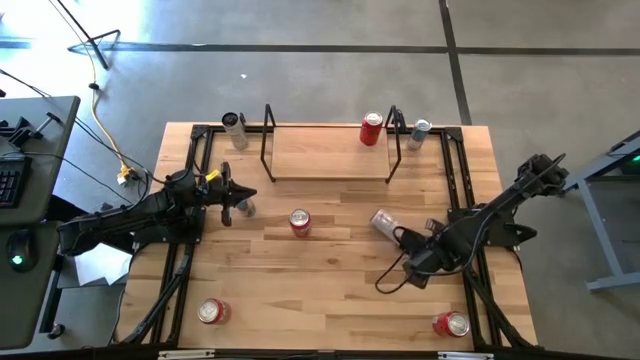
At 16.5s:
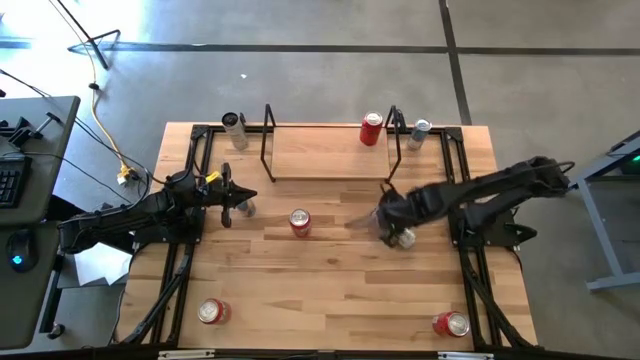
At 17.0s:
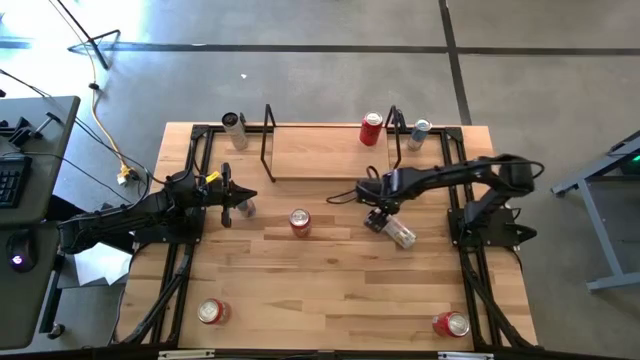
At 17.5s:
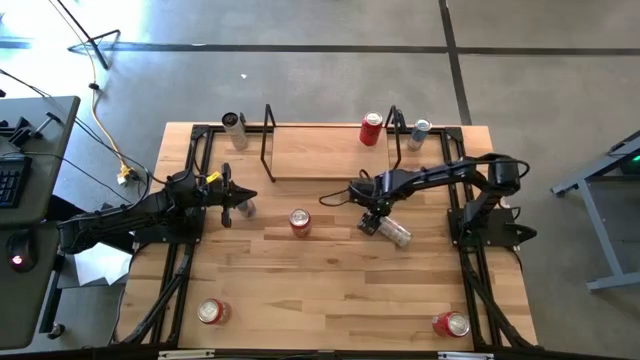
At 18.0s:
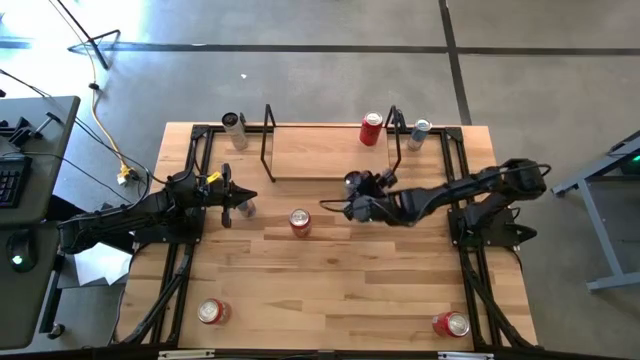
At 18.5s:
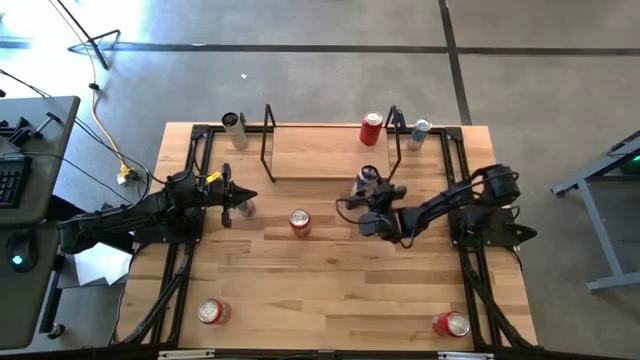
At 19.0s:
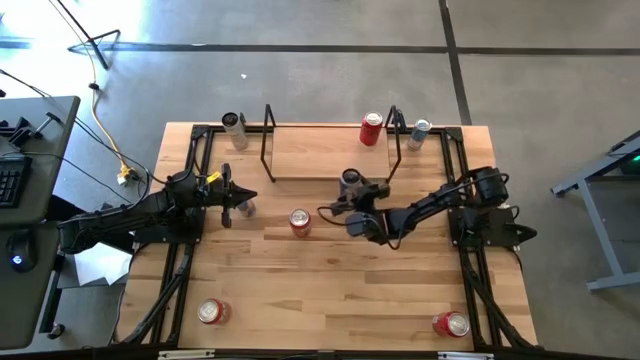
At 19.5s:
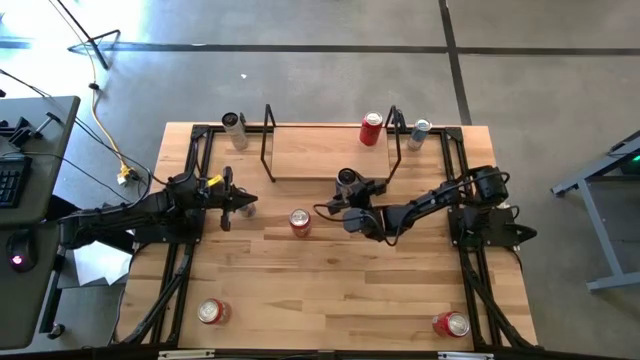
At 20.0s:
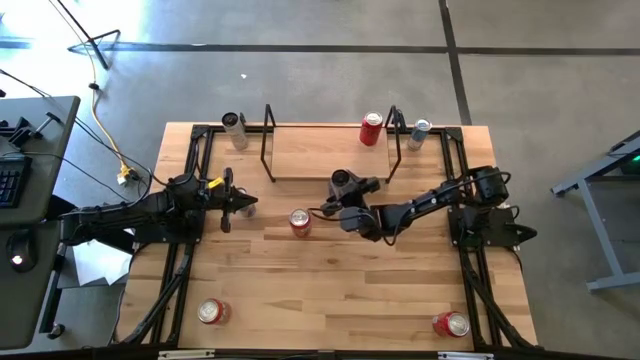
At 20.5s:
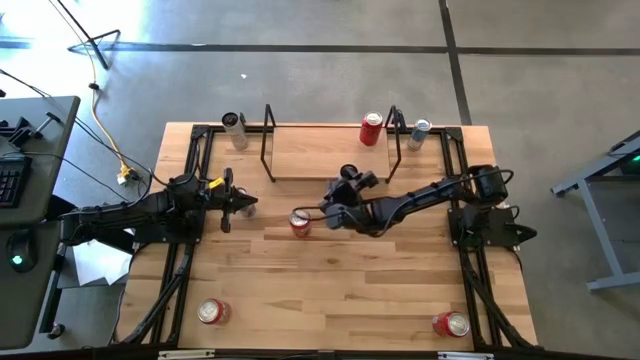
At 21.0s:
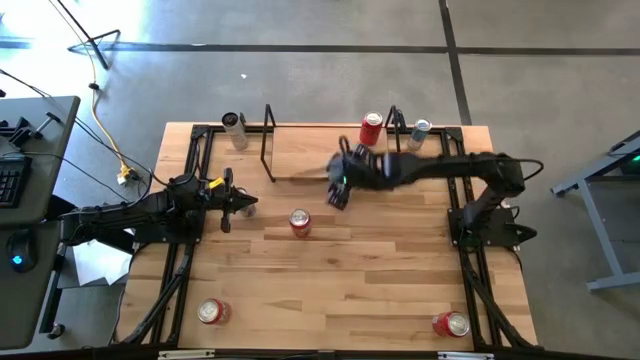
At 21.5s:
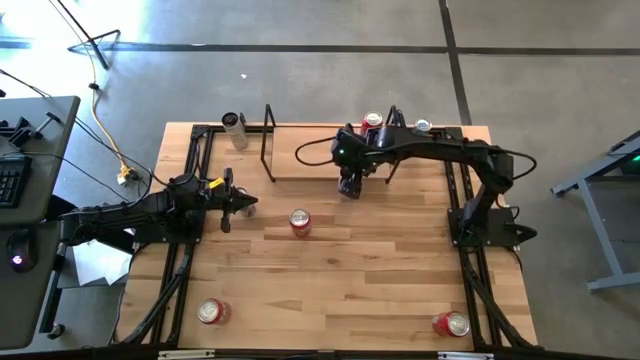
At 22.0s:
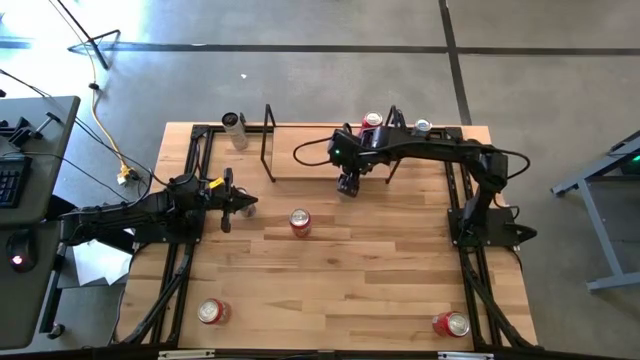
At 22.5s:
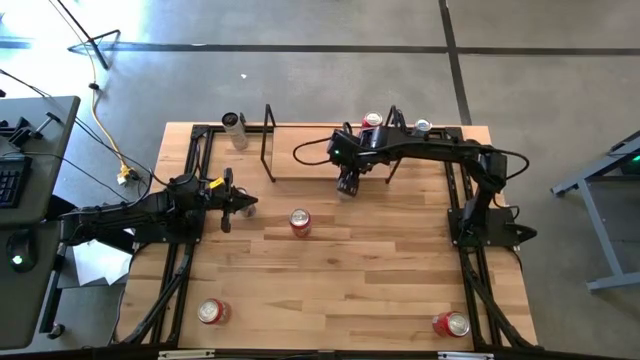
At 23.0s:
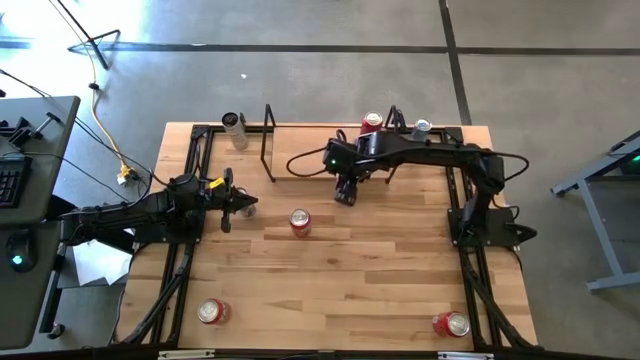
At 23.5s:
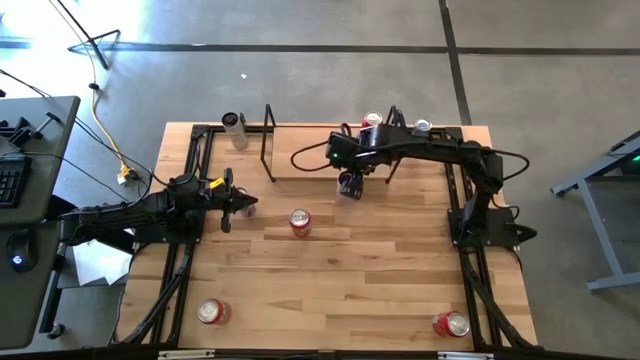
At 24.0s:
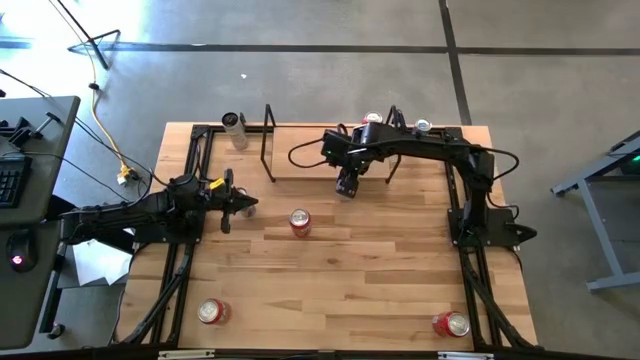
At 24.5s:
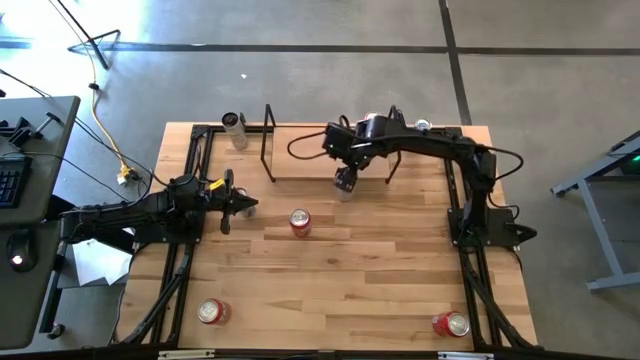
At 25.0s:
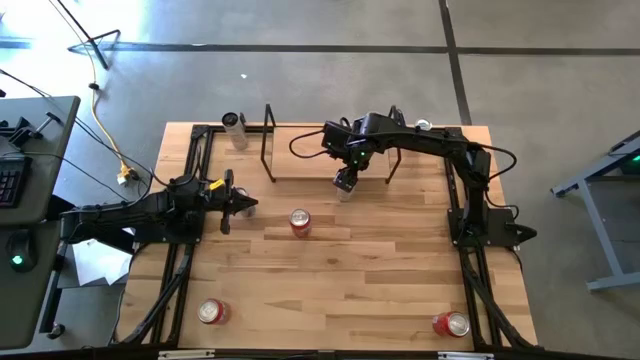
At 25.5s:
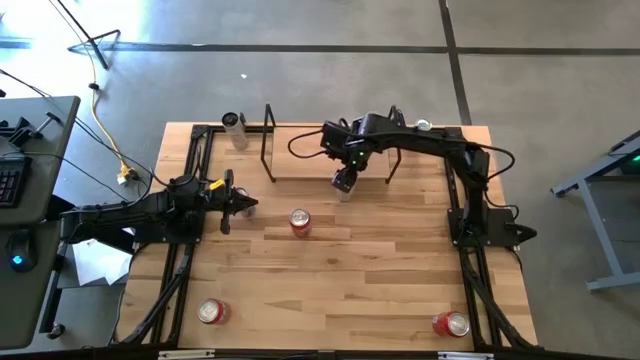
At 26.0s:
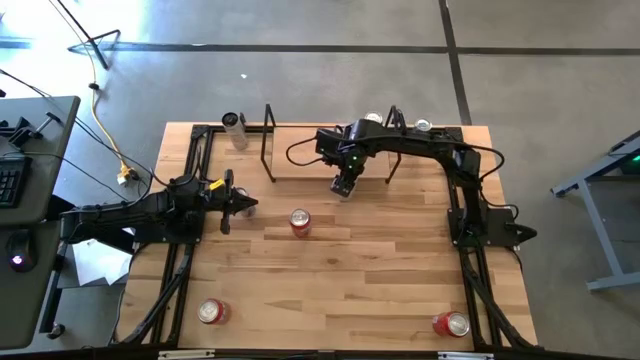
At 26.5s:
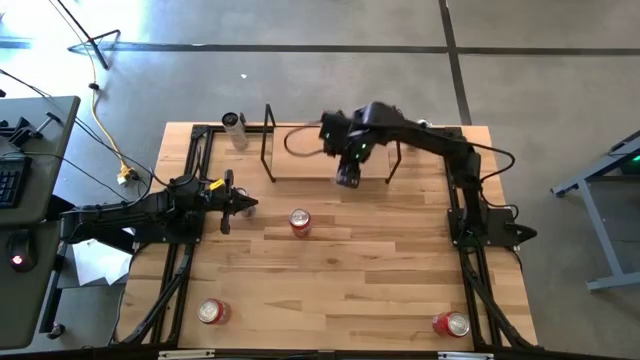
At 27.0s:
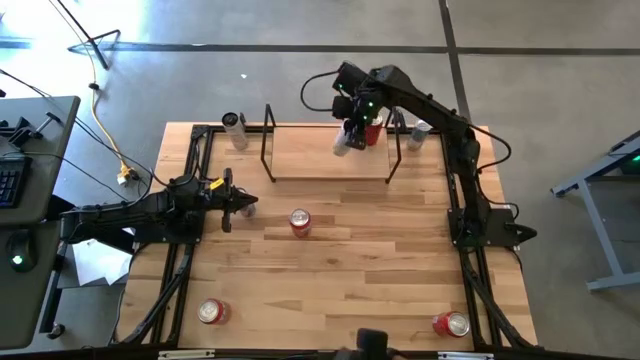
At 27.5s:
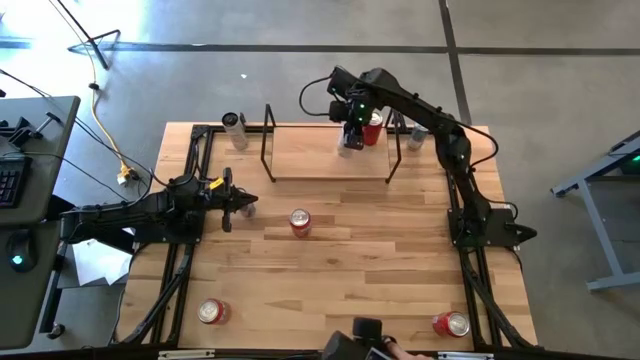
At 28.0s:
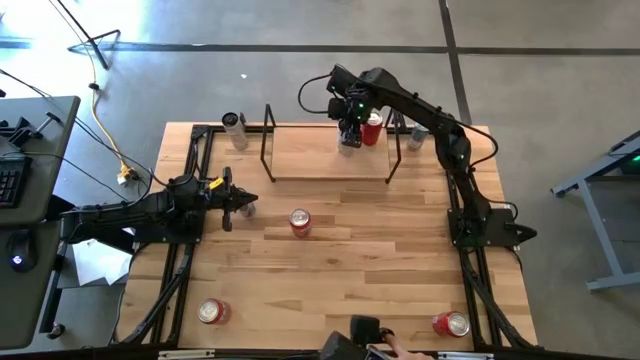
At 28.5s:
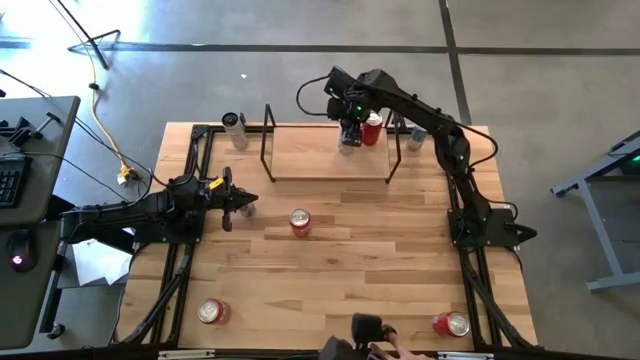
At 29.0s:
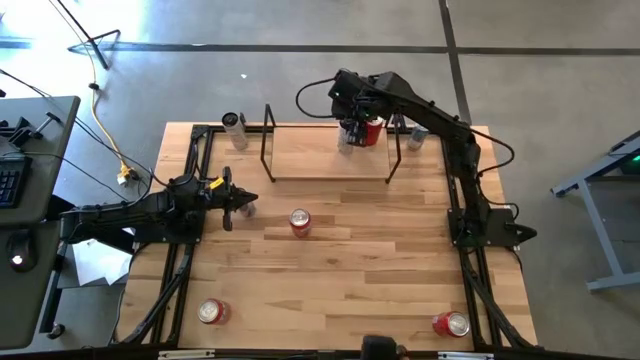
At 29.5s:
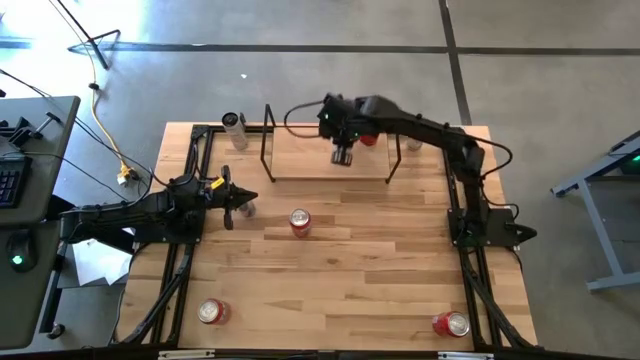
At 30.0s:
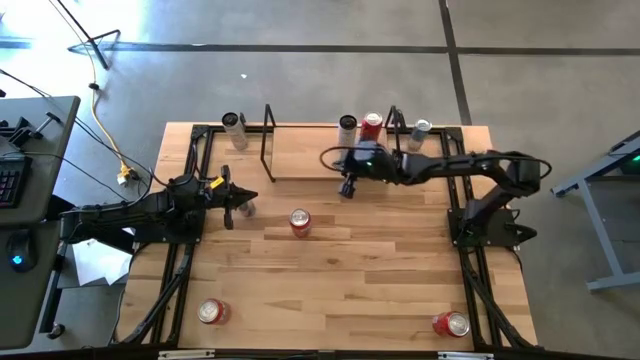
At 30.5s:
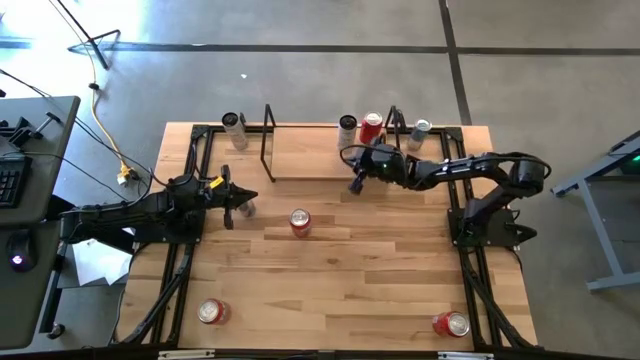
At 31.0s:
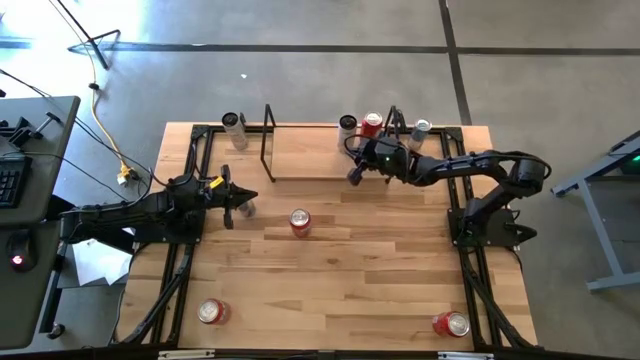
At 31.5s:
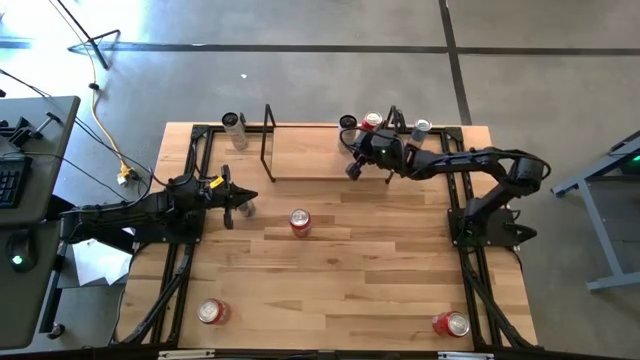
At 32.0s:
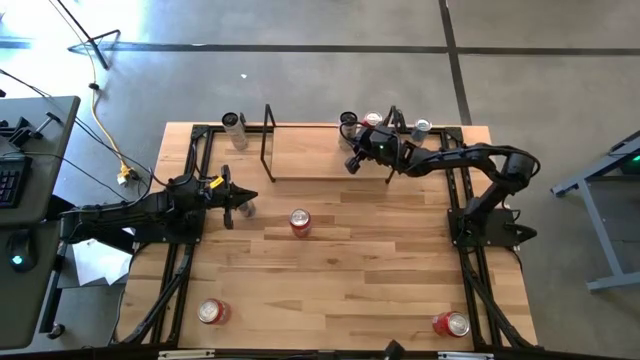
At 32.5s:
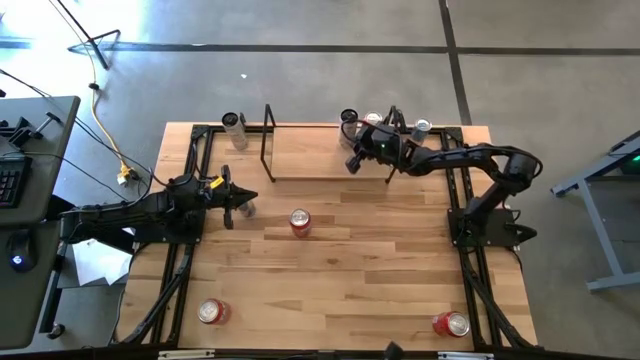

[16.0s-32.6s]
Task: Place canned beverage on shelf
Put the bottom white-yellow soda can on the shelf

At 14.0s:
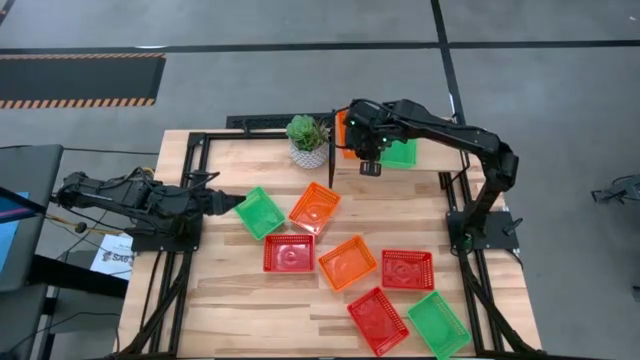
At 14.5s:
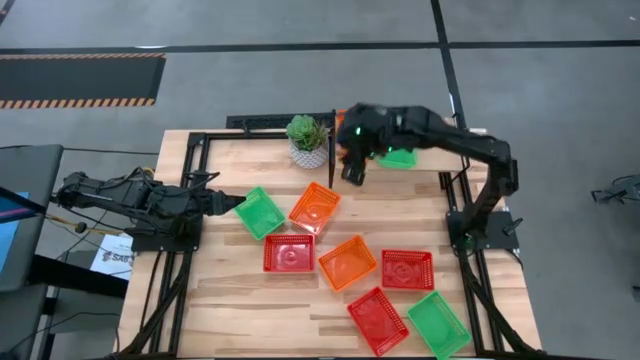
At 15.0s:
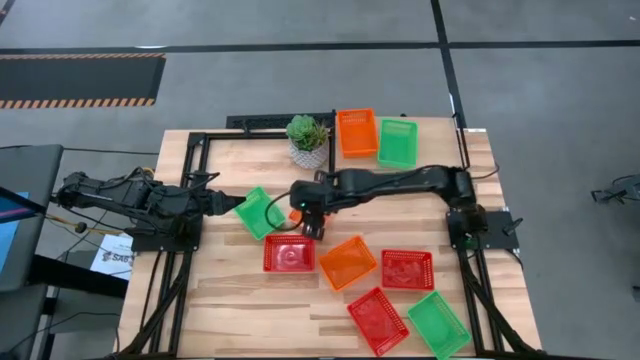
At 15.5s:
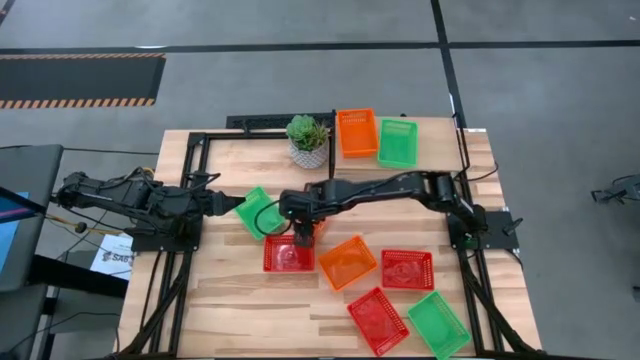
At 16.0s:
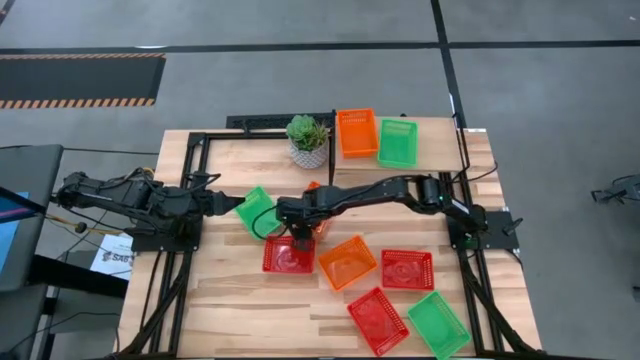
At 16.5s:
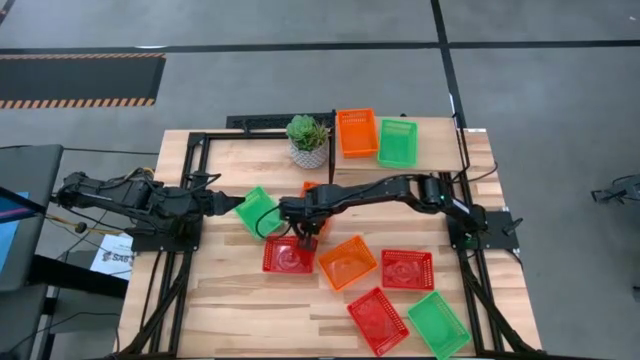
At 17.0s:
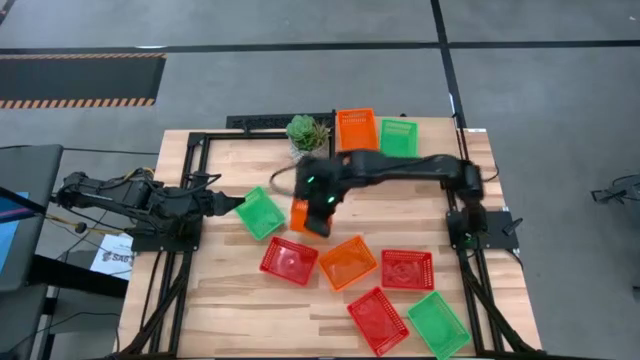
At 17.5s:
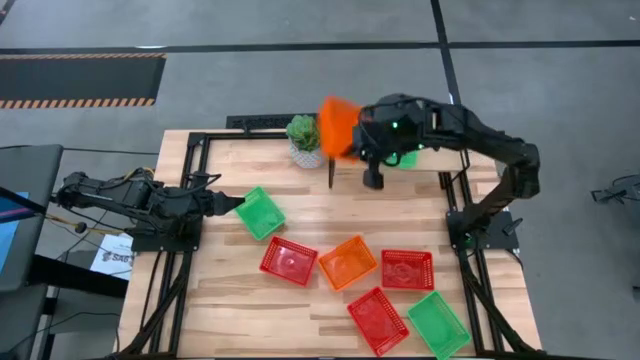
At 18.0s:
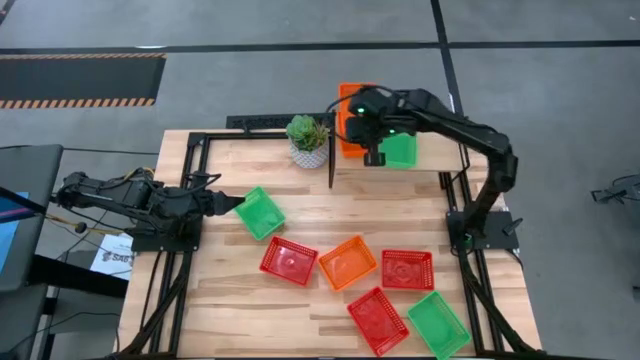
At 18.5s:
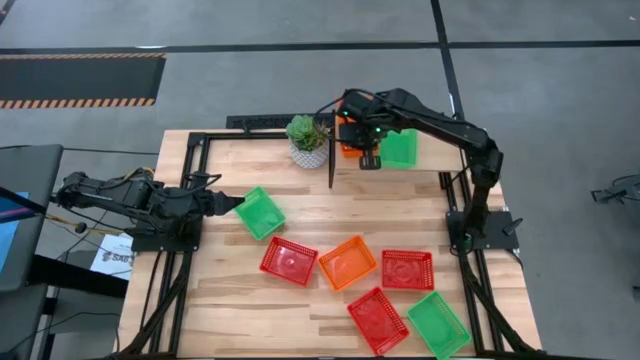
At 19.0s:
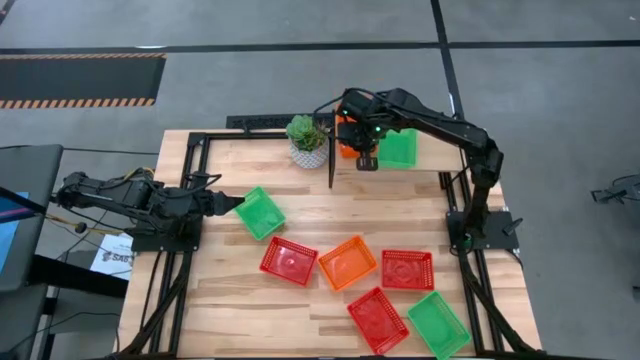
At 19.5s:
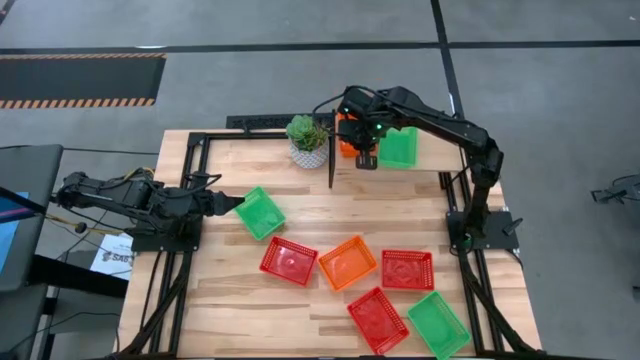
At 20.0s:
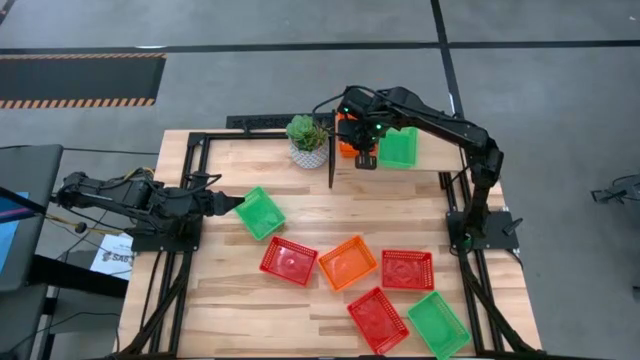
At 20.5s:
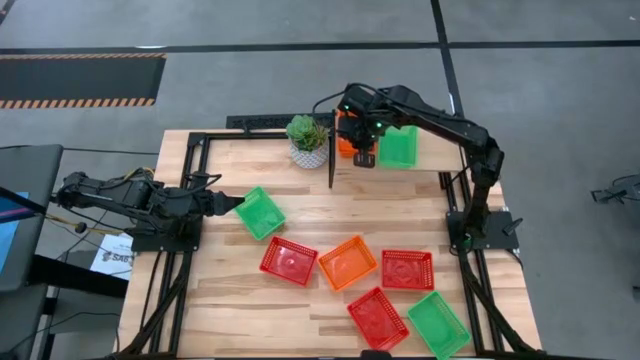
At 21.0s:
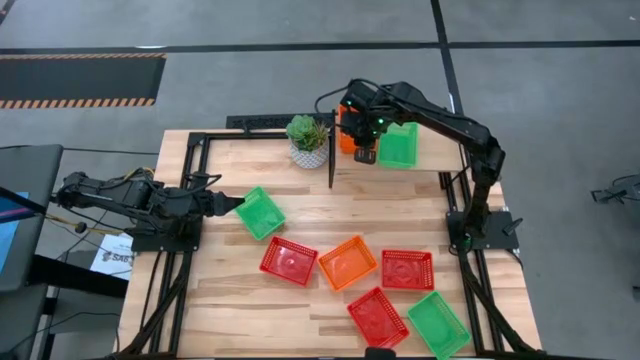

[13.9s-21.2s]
Task: Stack baskets on shelf by color
Stack the top orange bin on the orange bin on the shelf
